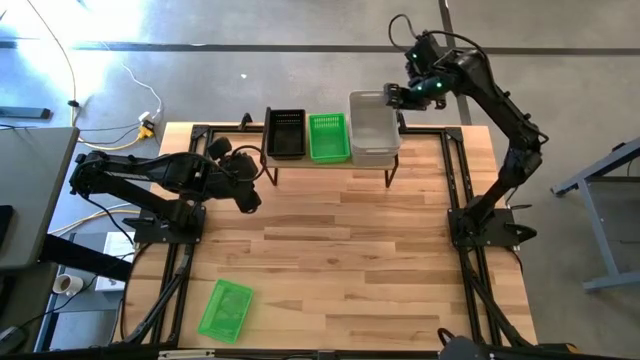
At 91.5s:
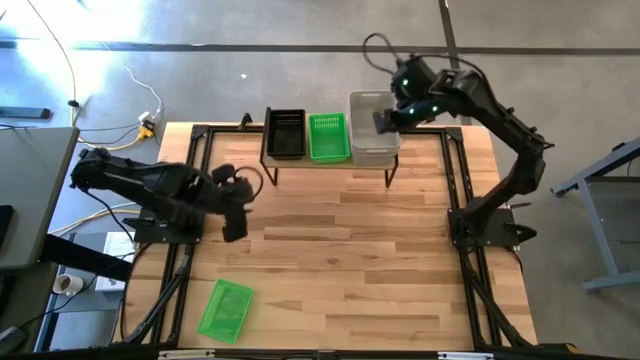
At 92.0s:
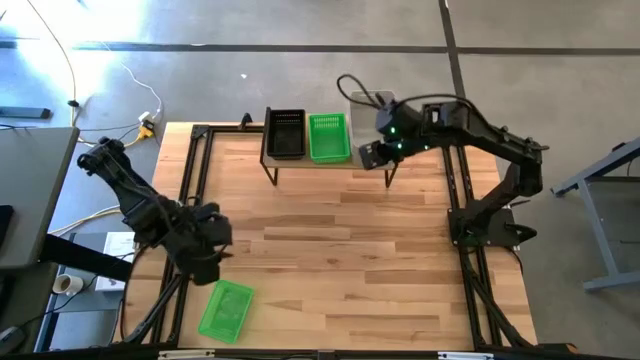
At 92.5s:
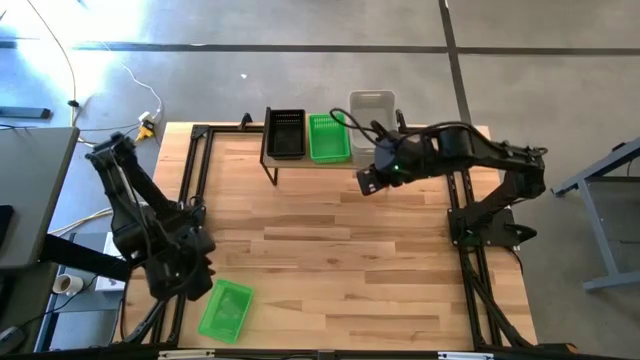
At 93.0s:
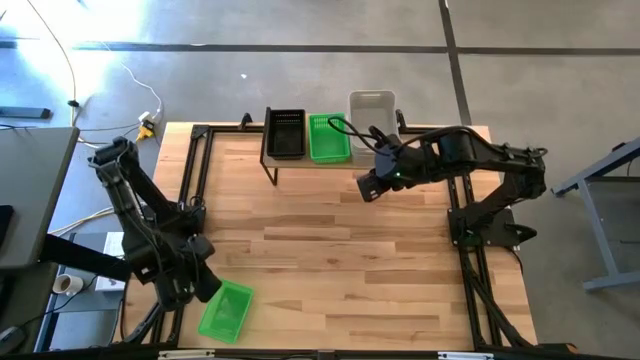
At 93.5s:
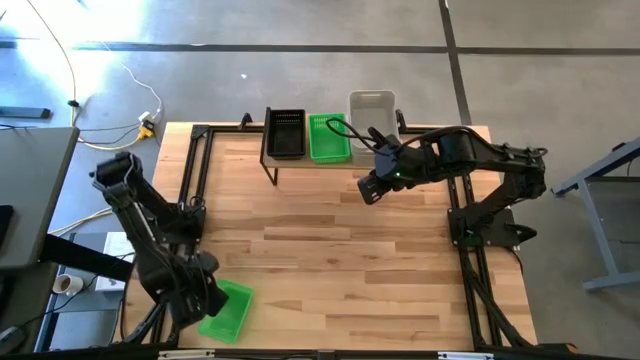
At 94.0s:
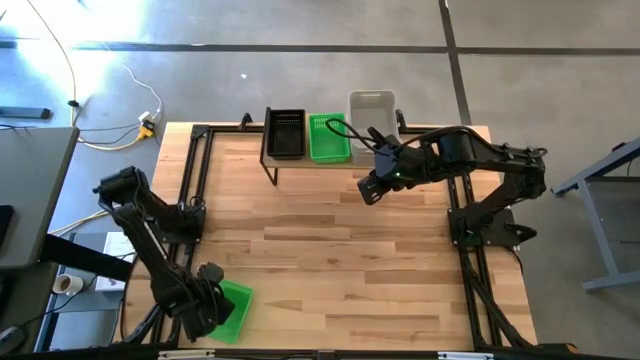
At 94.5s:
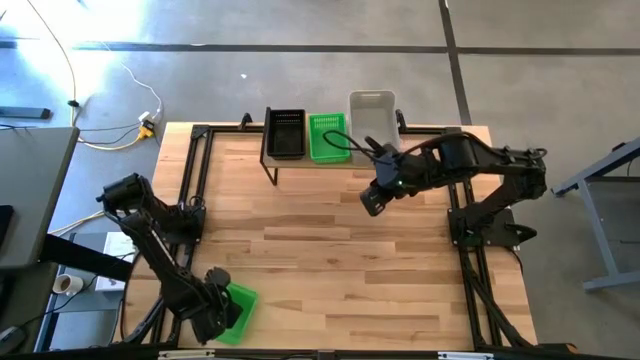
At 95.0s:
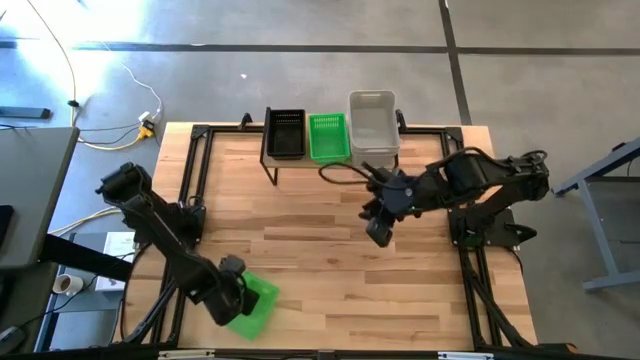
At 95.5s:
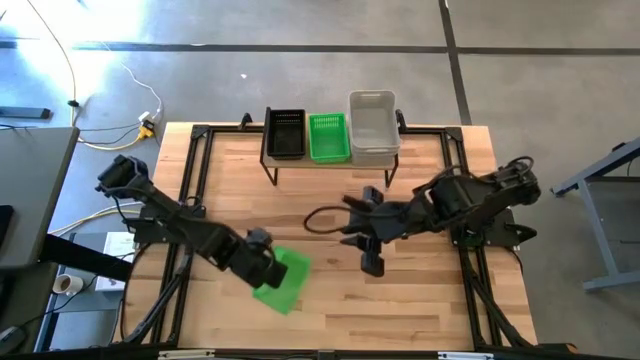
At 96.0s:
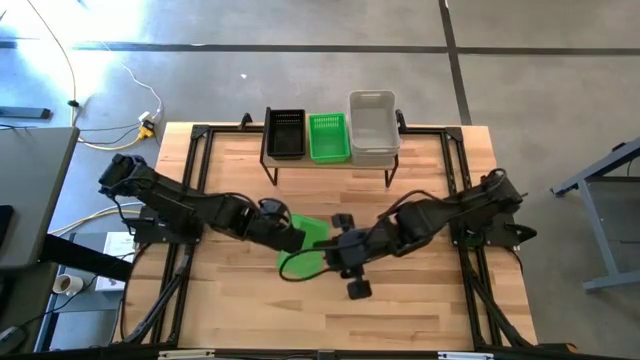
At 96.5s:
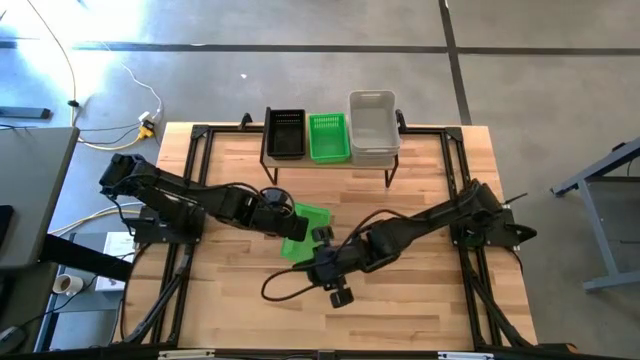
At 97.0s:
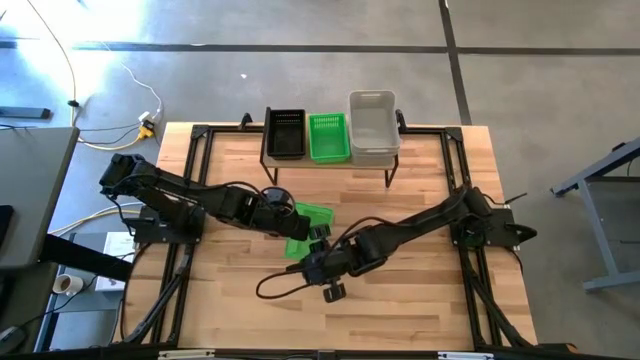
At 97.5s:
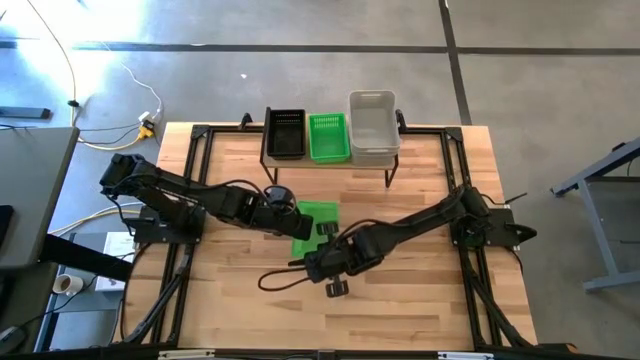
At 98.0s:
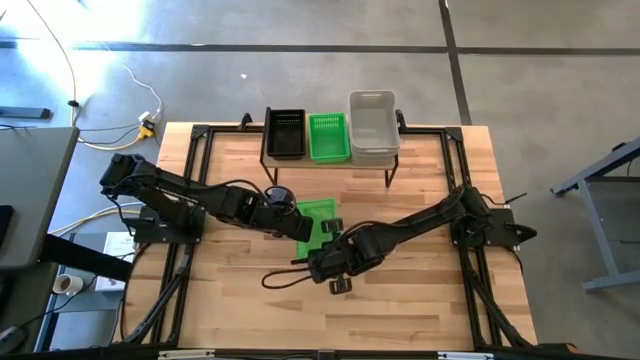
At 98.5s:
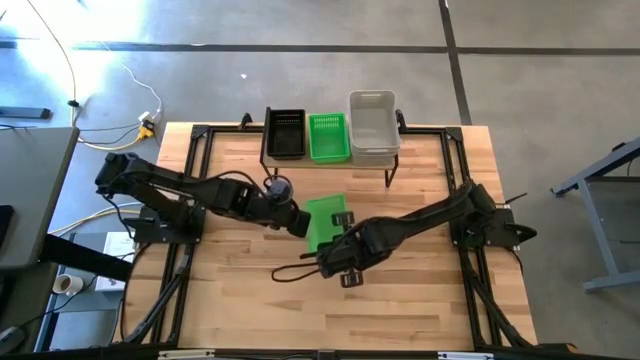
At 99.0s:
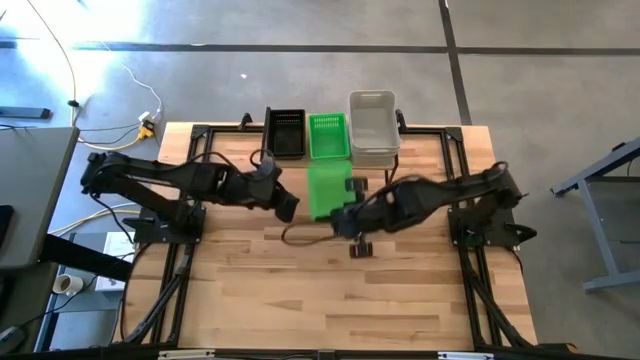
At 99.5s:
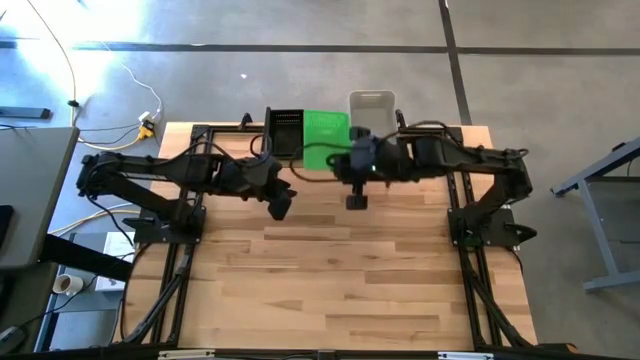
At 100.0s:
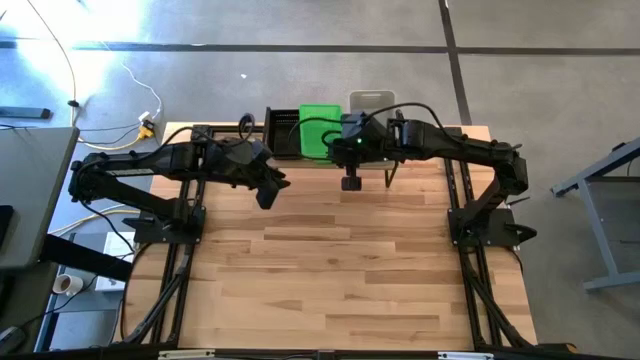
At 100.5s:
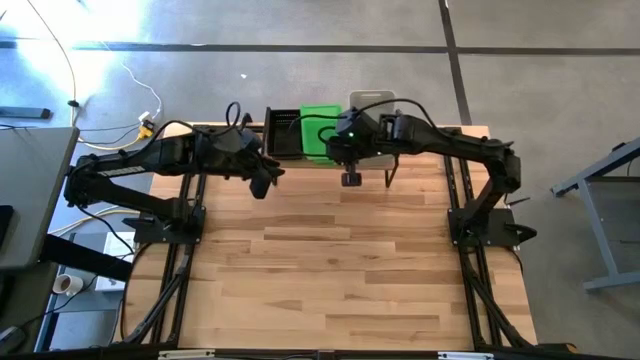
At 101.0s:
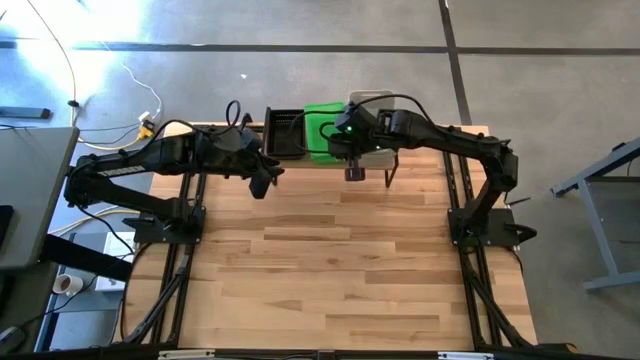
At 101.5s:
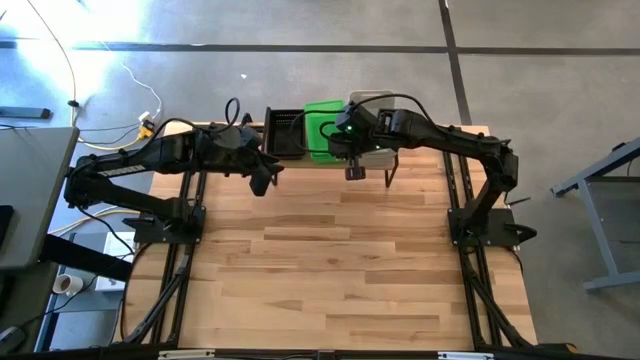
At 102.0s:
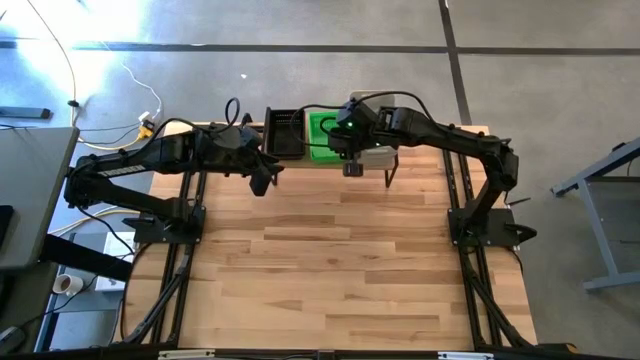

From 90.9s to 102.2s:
Task: Stack baskets on shelf by color
Stack the green bin on top of the stacked green bins on the shelf

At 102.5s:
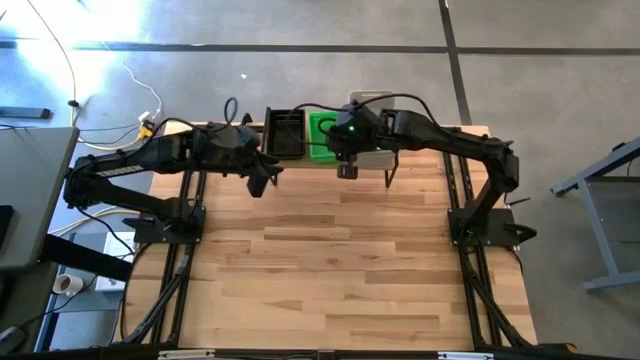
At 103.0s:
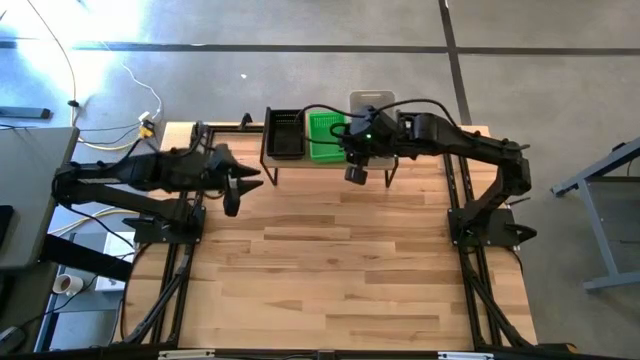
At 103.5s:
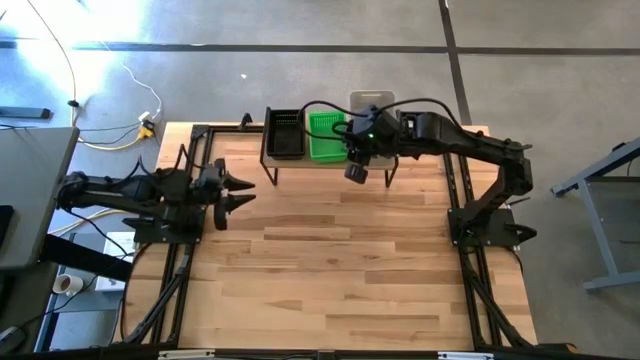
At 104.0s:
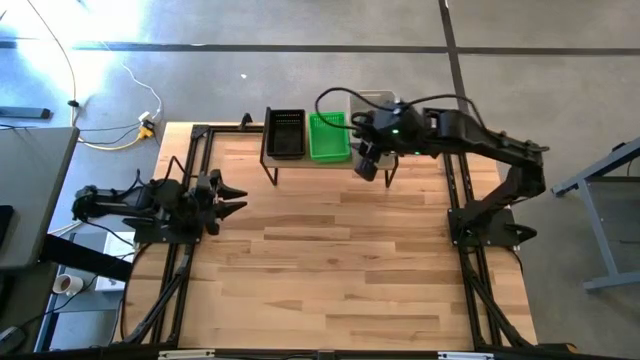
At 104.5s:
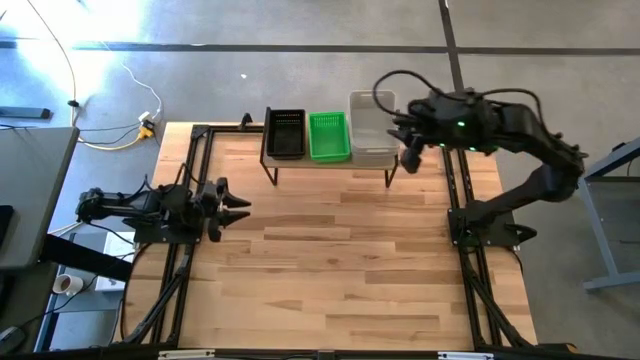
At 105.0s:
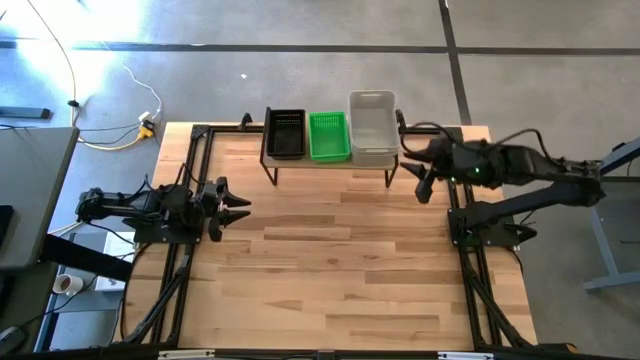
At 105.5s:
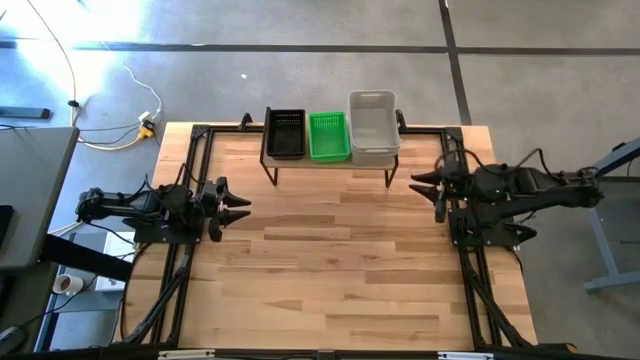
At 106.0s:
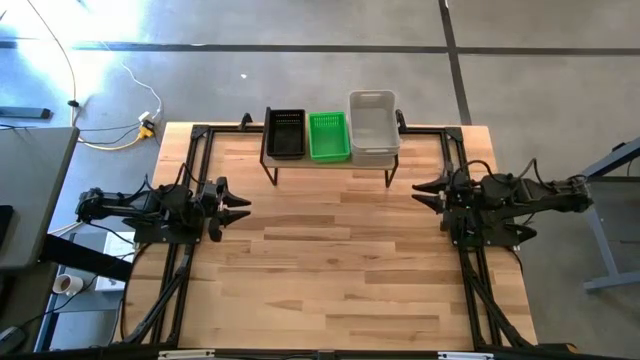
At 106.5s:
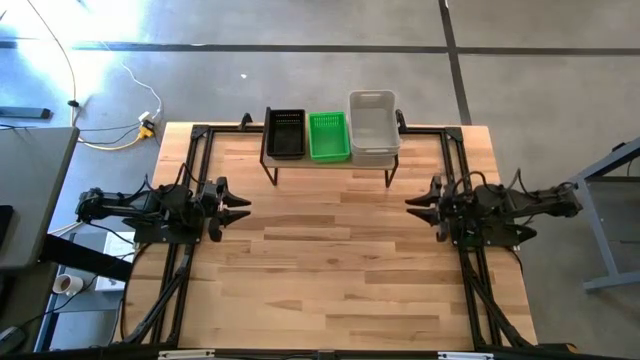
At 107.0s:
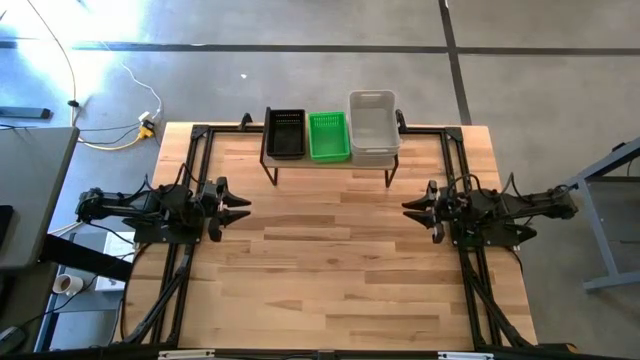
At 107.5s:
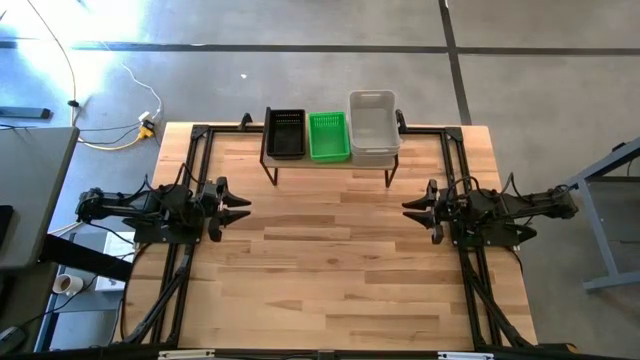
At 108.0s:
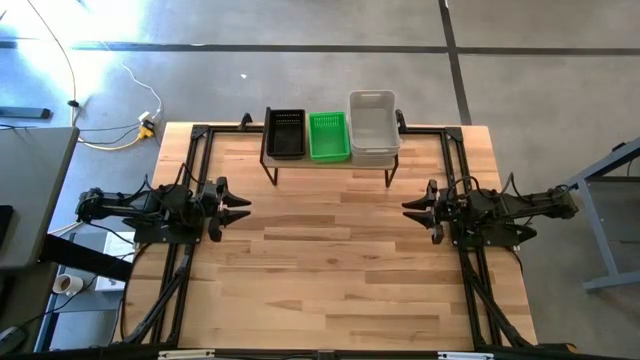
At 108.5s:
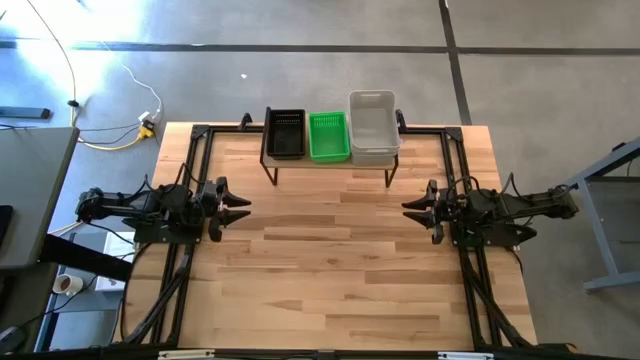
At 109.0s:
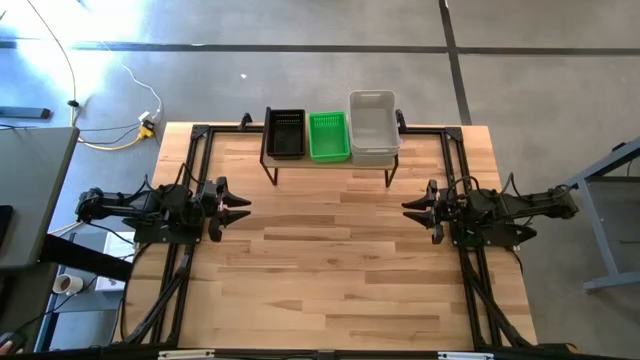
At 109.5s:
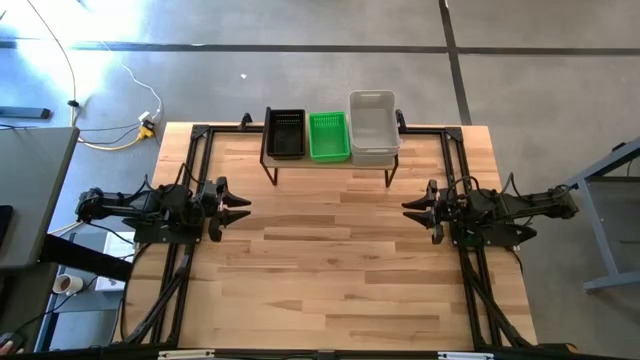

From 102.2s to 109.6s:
Return to Home Position

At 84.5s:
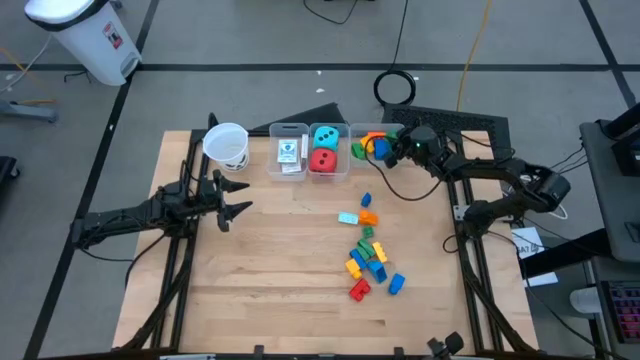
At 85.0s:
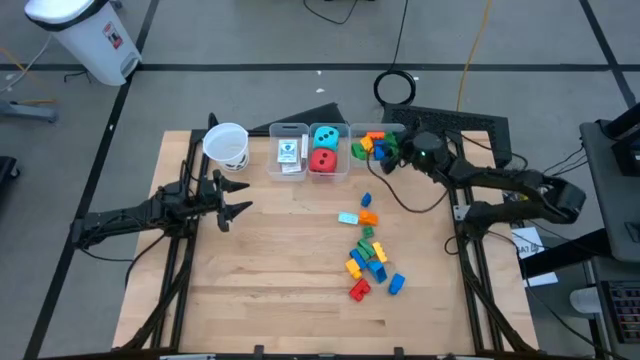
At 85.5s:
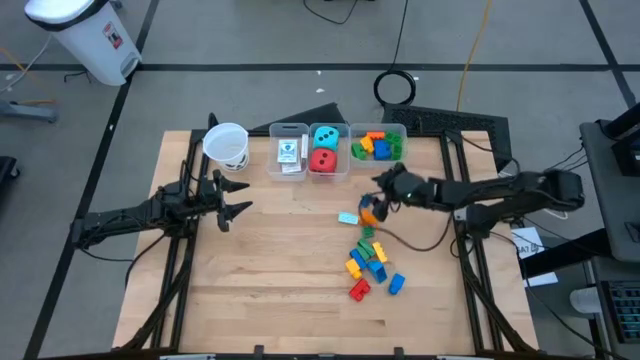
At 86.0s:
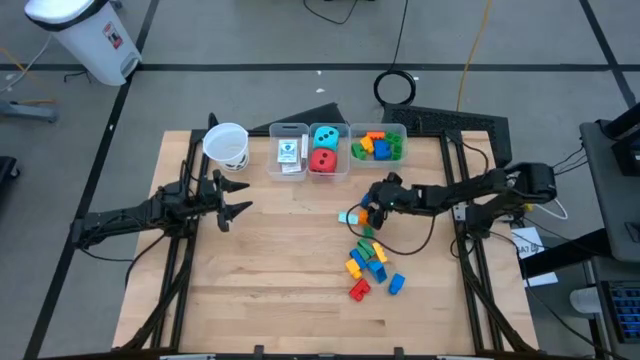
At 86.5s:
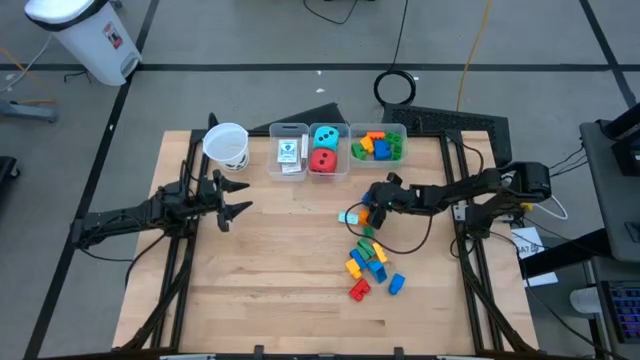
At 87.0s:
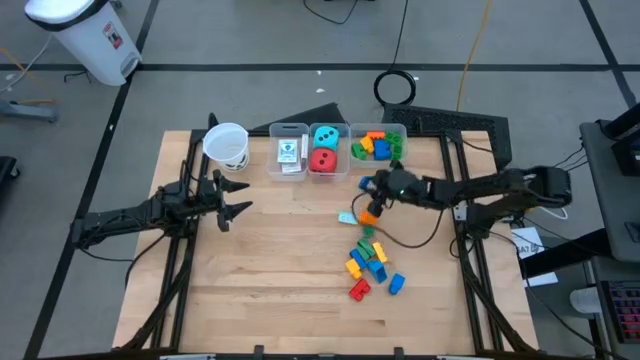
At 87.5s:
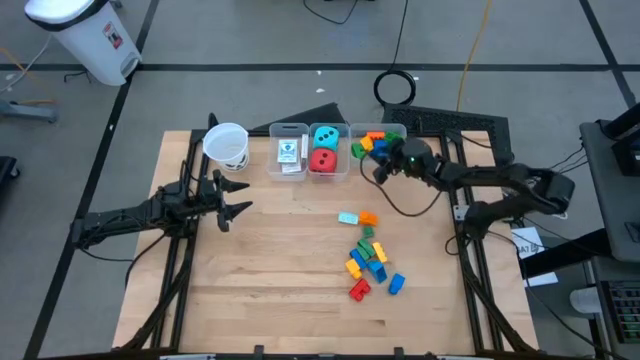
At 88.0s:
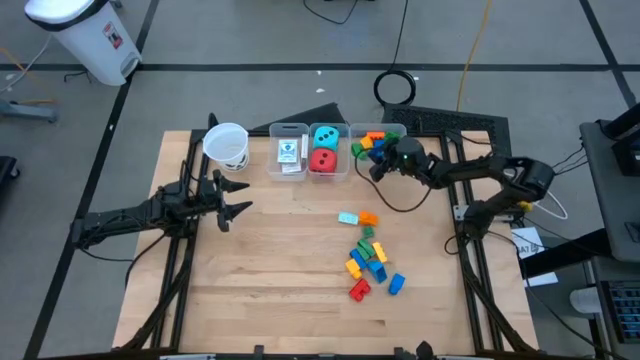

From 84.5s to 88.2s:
Task: Pick & Place Toys
Put the blue game piece into the right transparent bin
